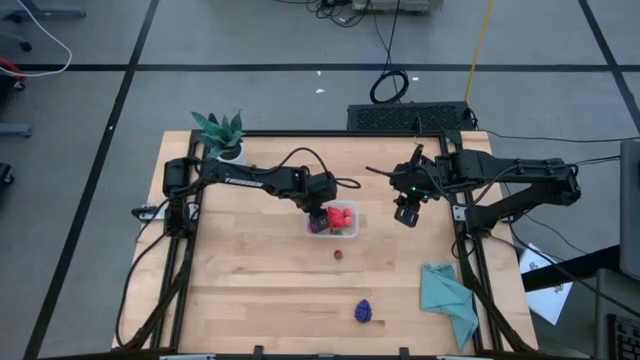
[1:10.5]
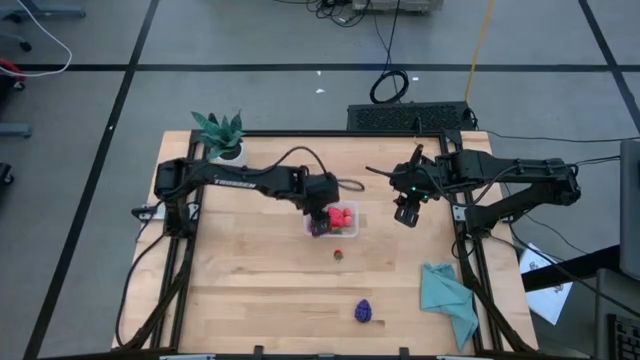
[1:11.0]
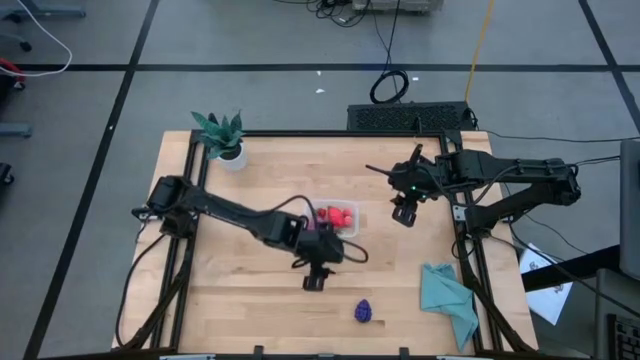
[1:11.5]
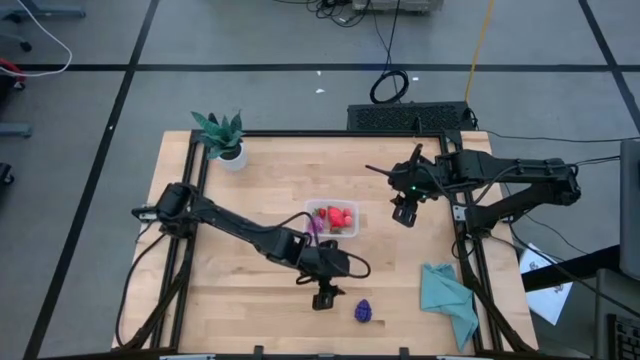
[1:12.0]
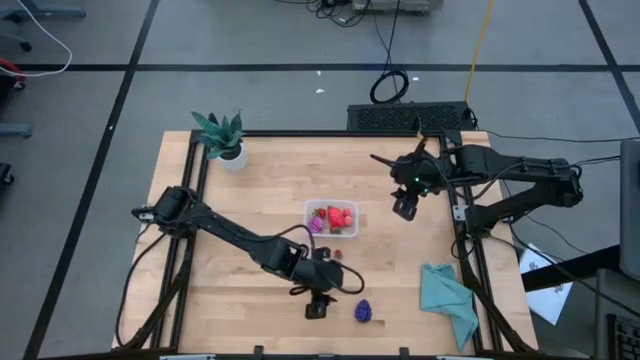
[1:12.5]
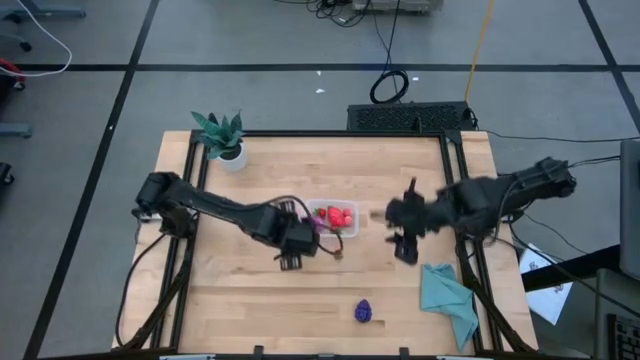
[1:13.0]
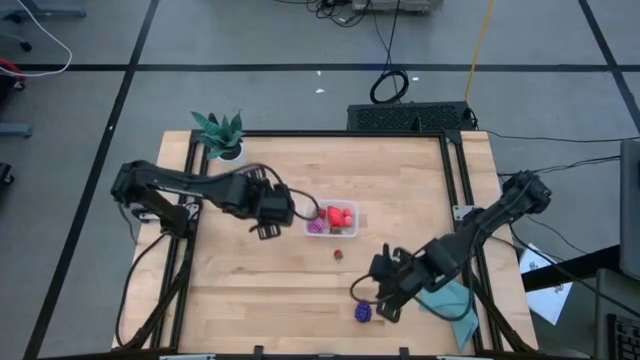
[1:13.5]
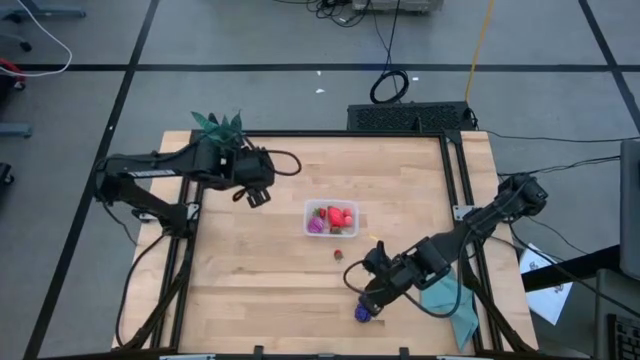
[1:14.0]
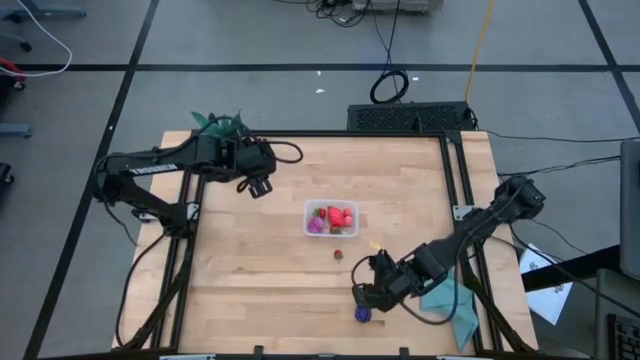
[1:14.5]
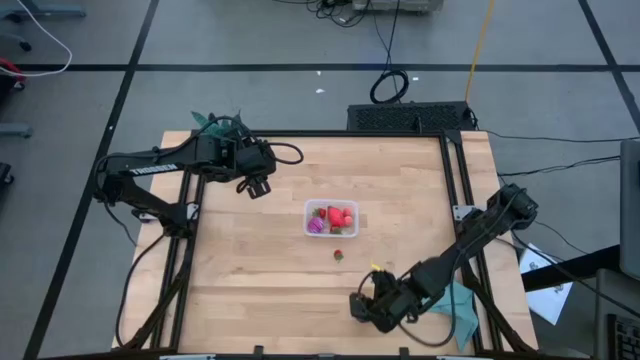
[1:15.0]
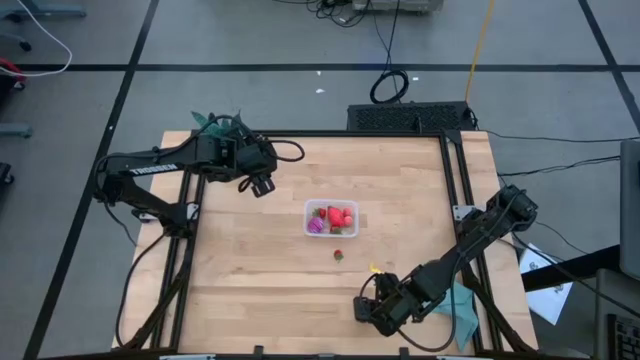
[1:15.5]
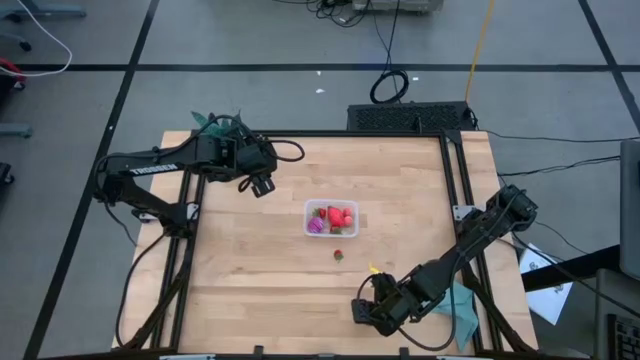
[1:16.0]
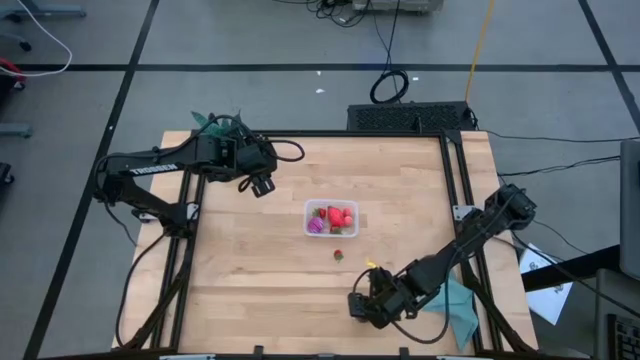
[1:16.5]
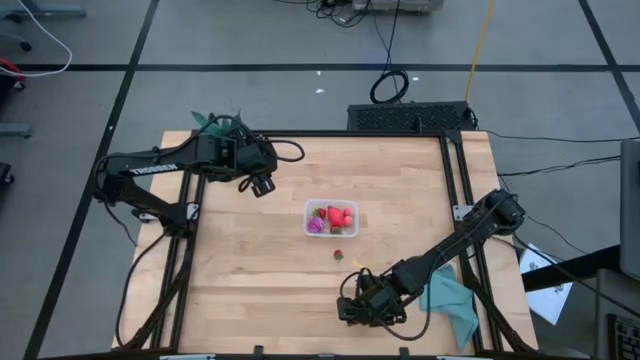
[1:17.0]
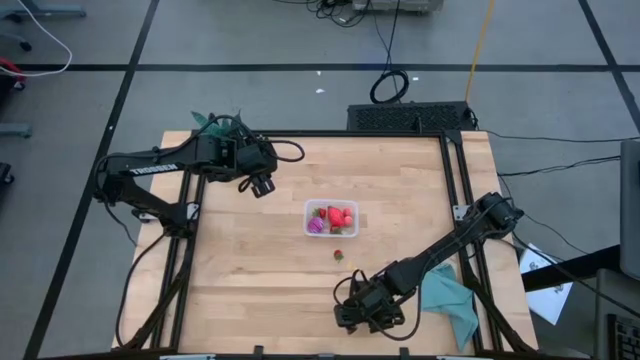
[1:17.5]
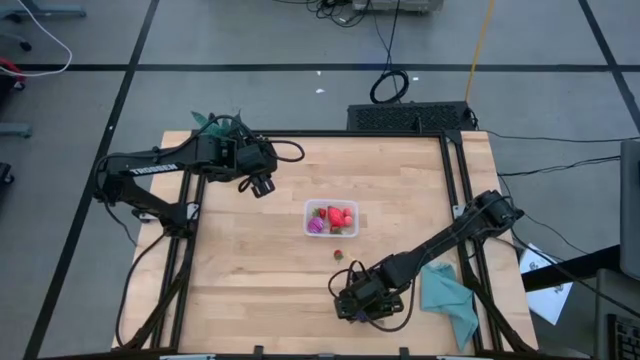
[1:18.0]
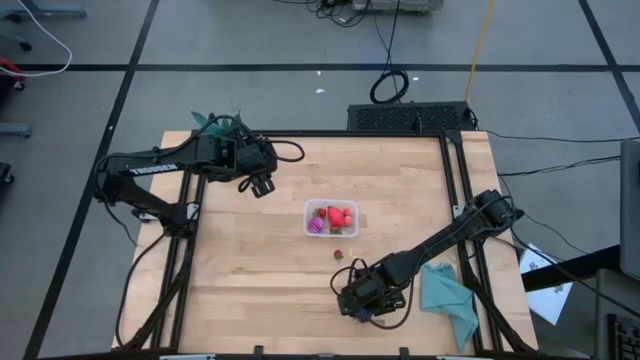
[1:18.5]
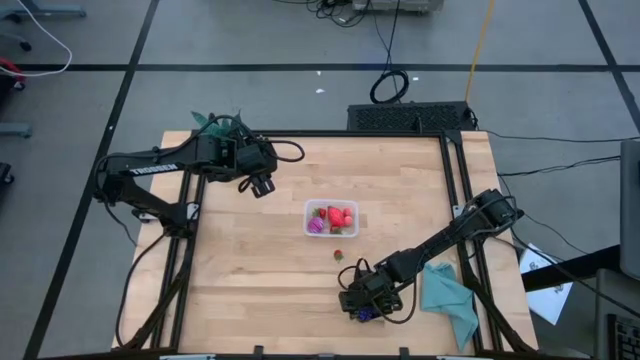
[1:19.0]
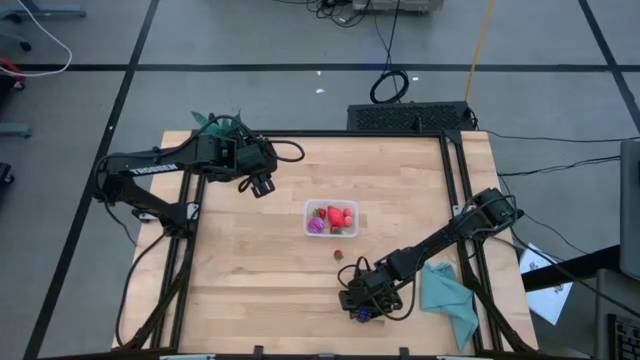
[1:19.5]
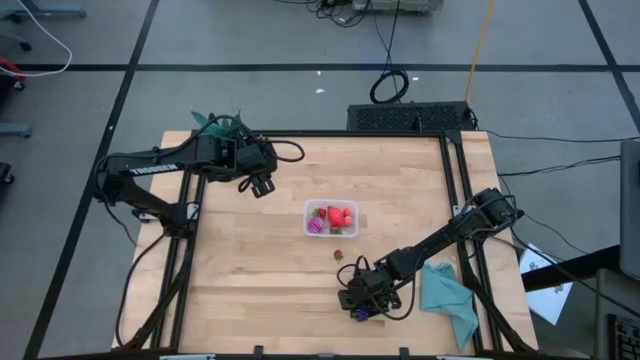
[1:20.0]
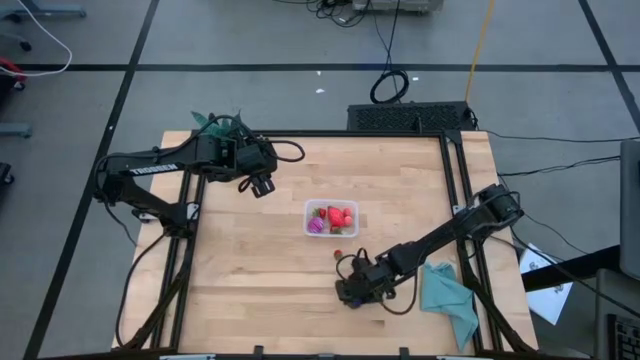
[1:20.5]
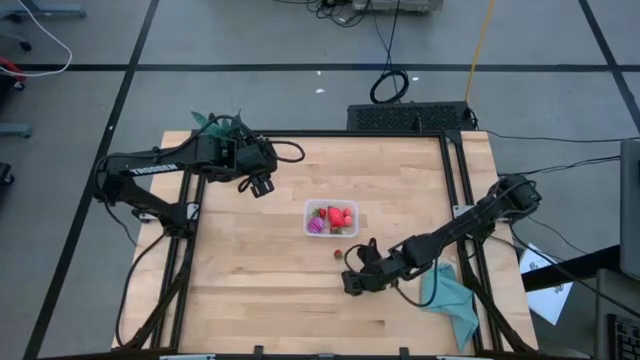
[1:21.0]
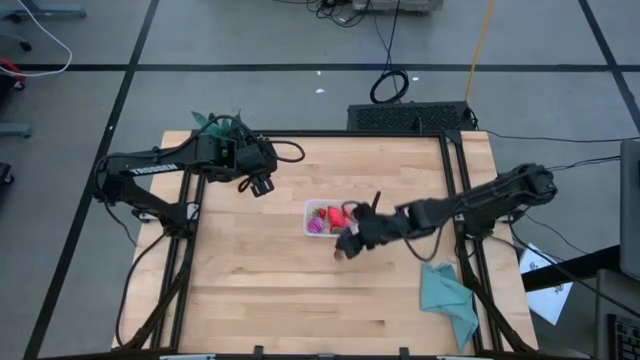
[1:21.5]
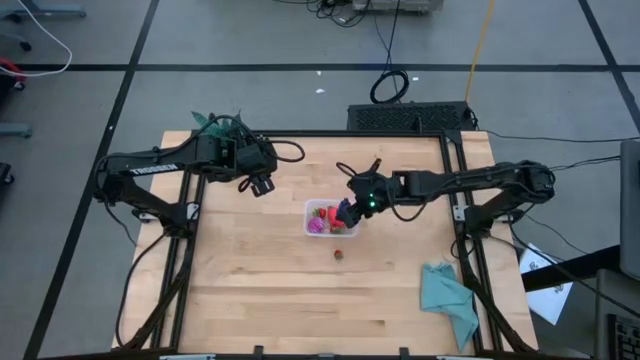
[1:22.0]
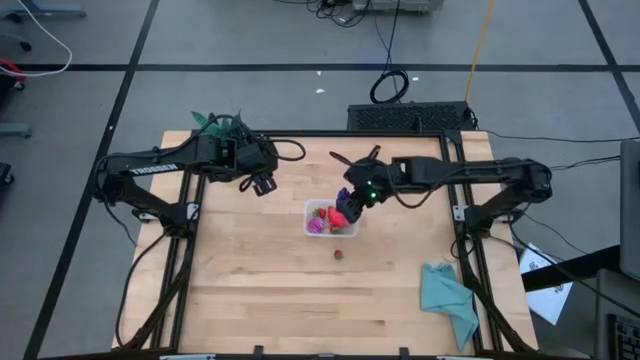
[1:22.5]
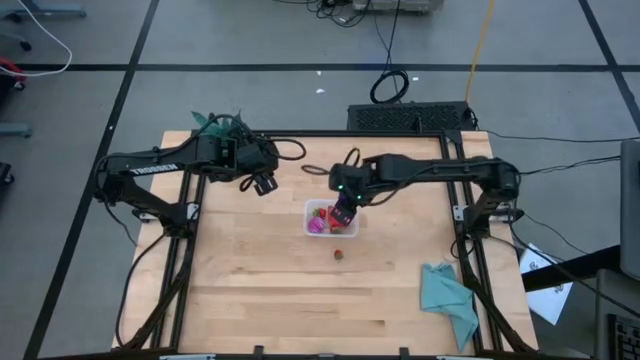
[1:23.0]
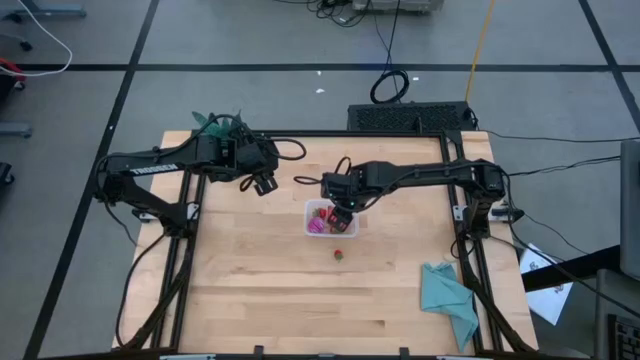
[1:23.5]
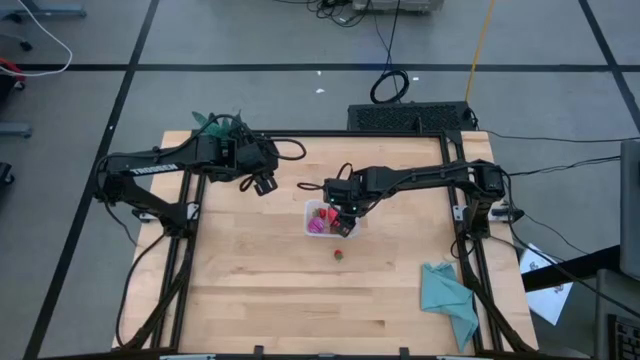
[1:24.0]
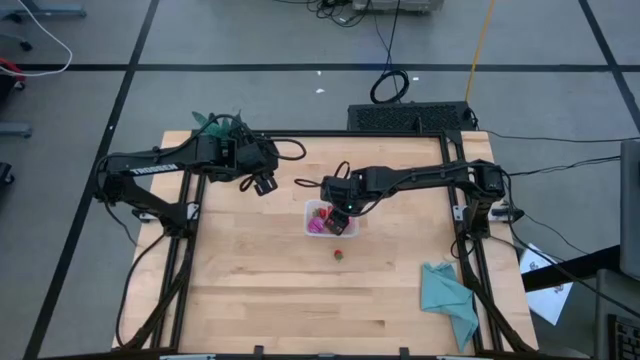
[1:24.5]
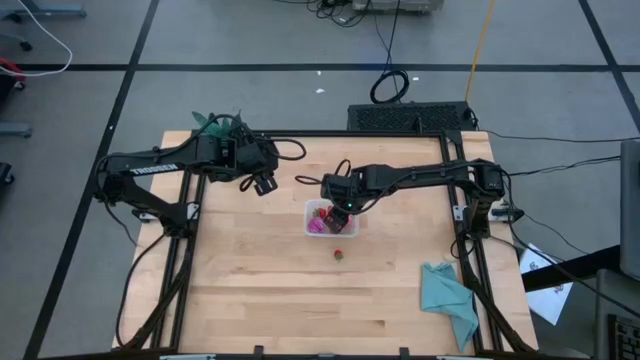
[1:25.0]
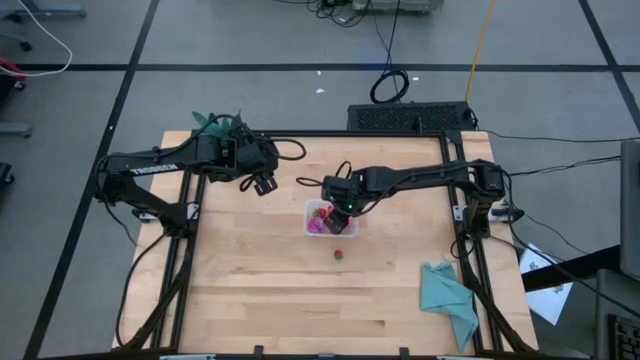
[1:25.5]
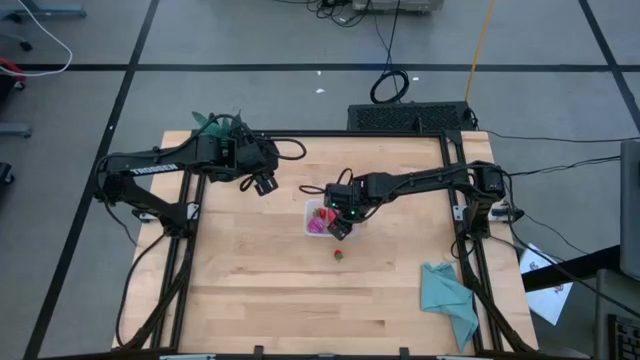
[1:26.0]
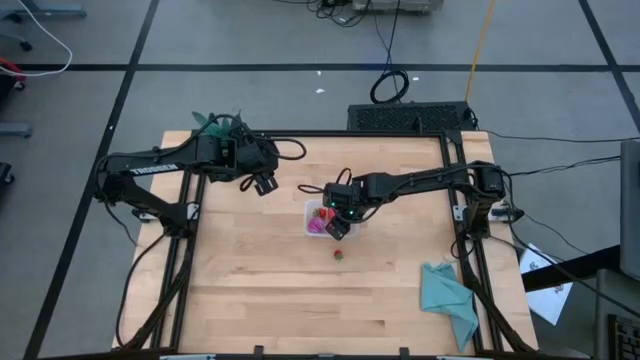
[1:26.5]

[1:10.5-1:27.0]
Task: Pick and placing Produce into tupperware
Put the purple grapes into the transparent bin

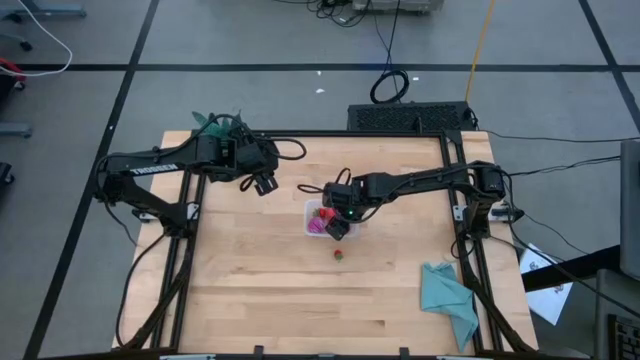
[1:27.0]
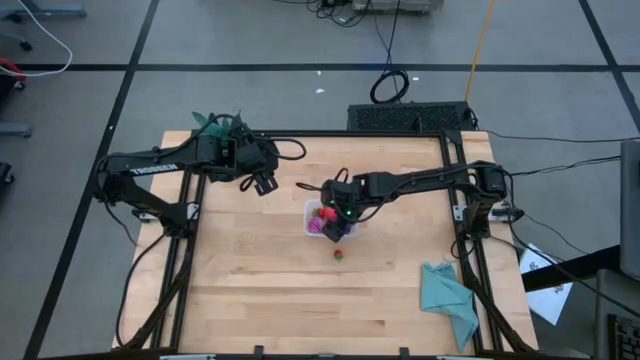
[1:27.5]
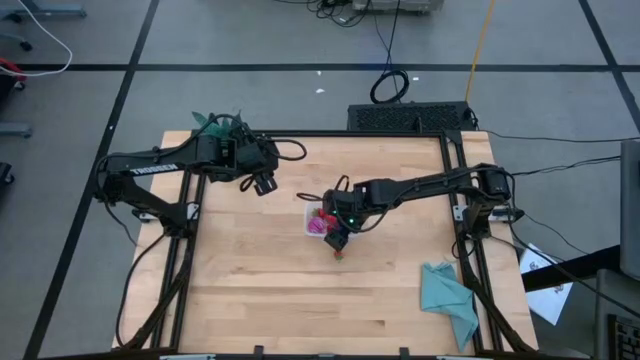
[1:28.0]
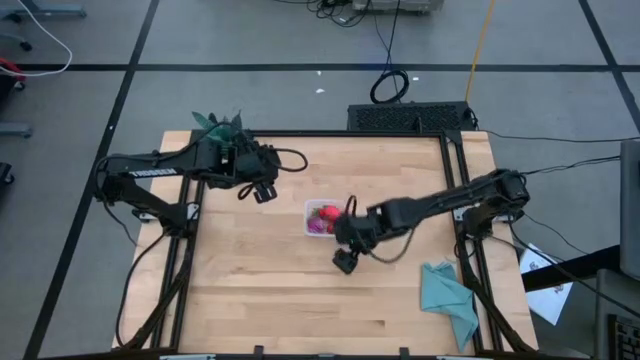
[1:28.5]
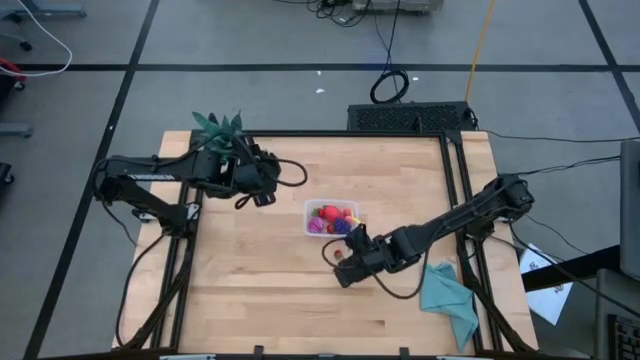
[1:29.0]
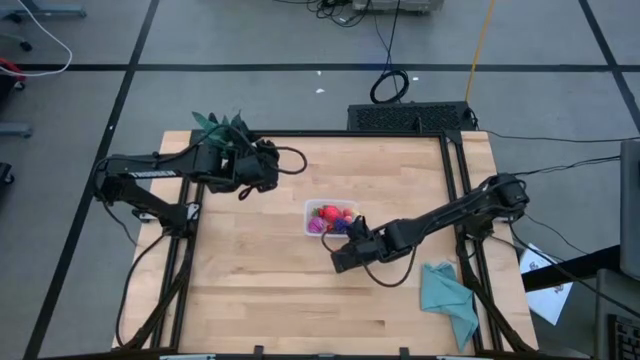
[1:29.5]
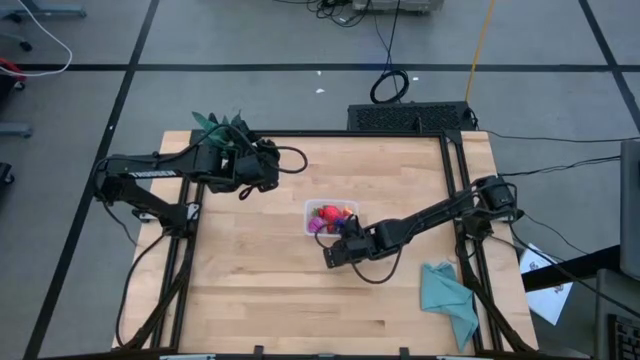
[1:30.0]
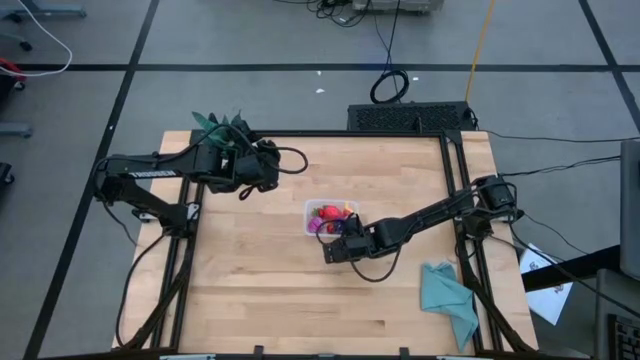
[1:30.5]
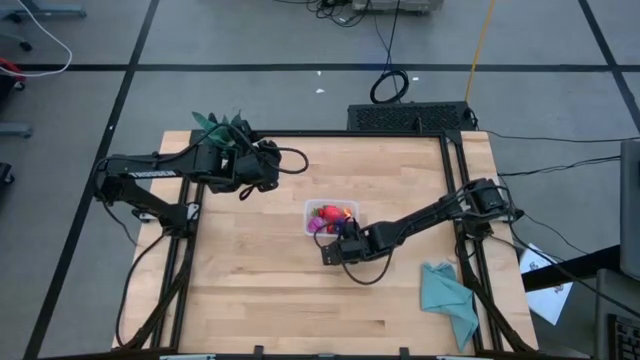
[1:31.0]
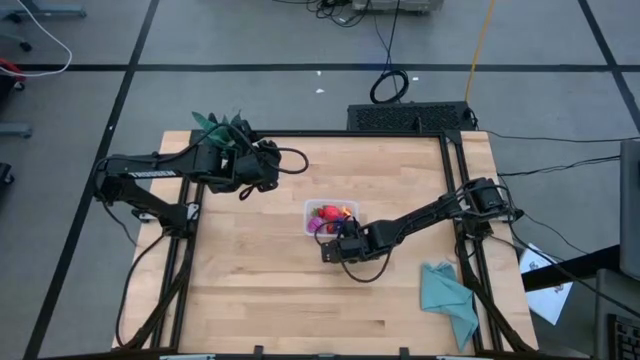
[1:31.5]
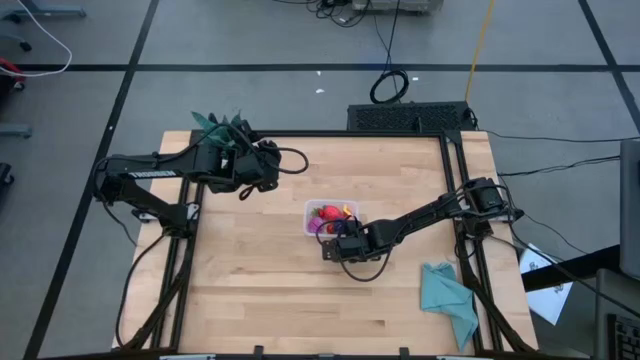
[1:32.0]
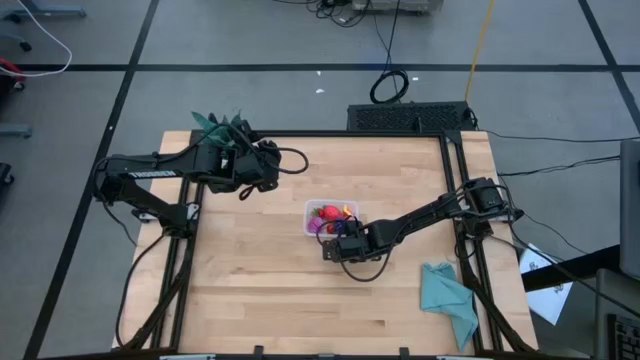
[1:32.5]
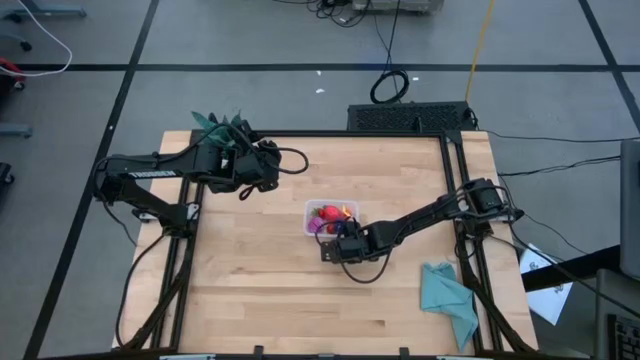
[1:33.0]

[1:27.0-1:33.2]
Put the red strawberry into the transparent bin
